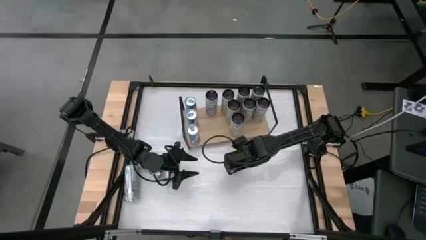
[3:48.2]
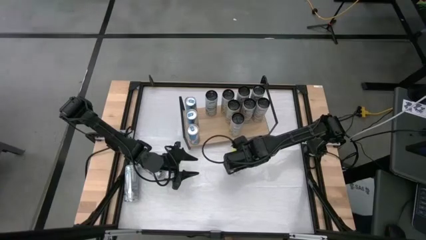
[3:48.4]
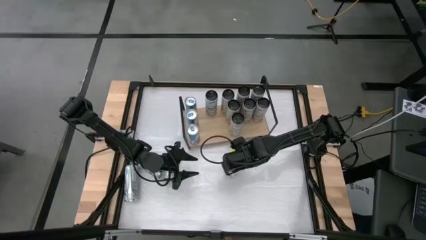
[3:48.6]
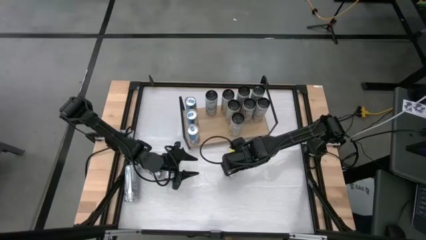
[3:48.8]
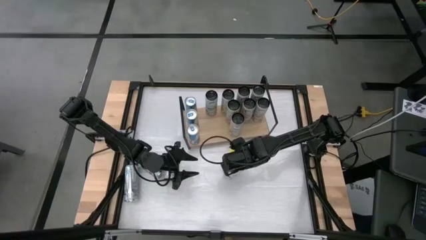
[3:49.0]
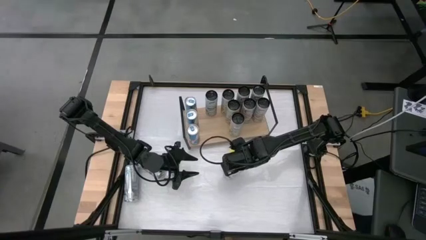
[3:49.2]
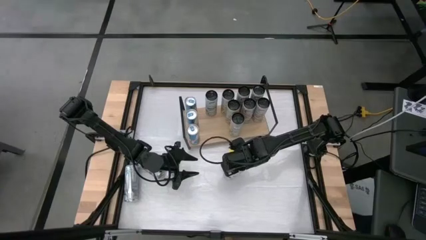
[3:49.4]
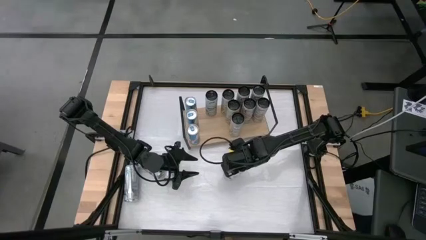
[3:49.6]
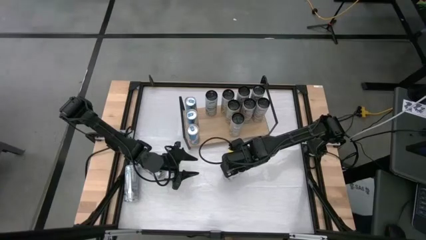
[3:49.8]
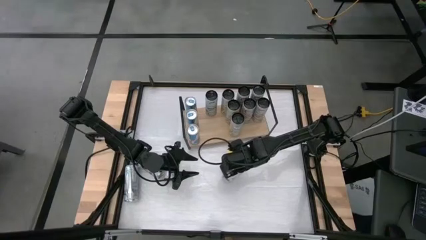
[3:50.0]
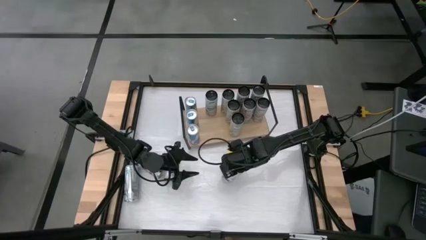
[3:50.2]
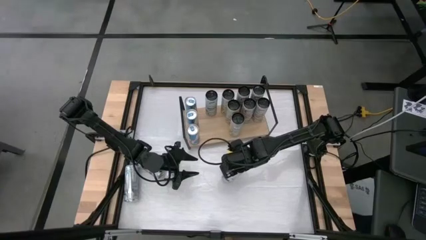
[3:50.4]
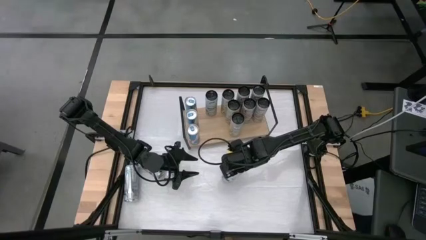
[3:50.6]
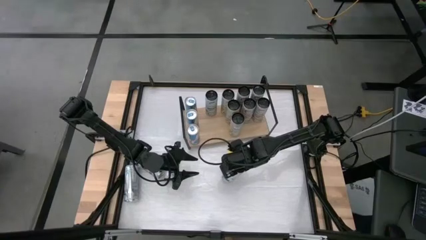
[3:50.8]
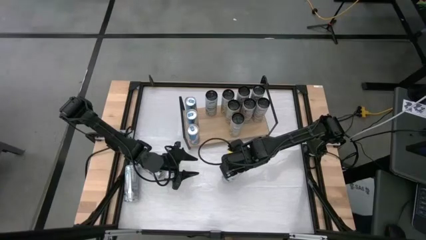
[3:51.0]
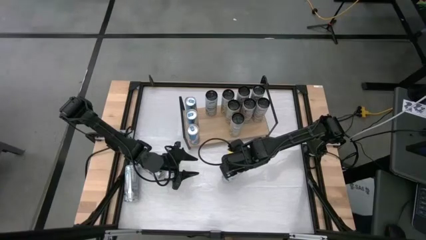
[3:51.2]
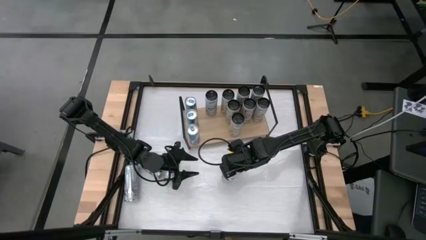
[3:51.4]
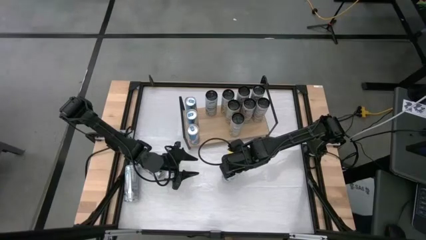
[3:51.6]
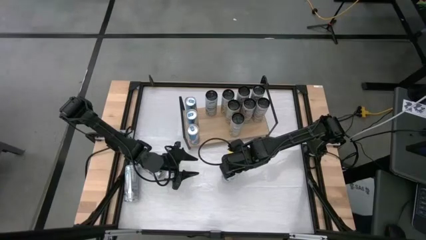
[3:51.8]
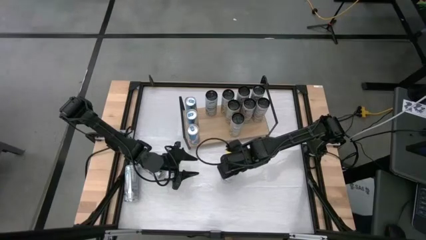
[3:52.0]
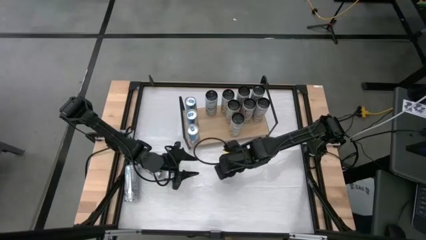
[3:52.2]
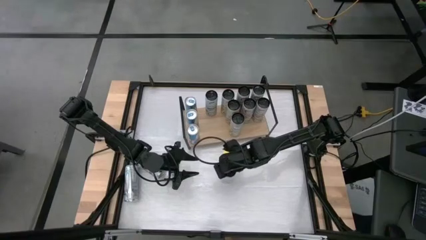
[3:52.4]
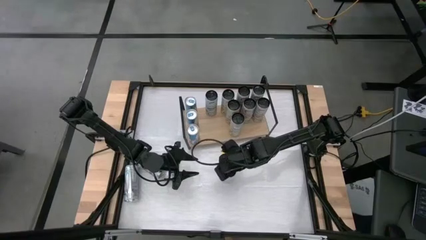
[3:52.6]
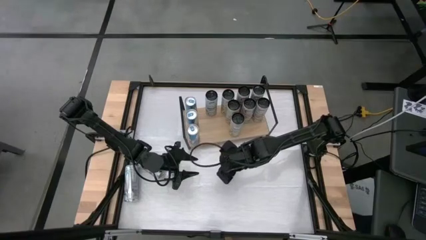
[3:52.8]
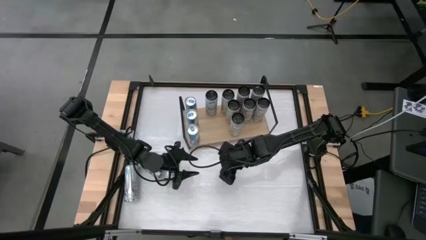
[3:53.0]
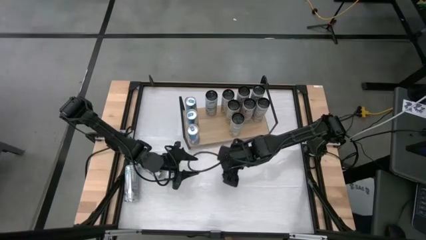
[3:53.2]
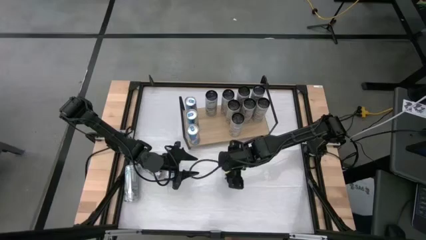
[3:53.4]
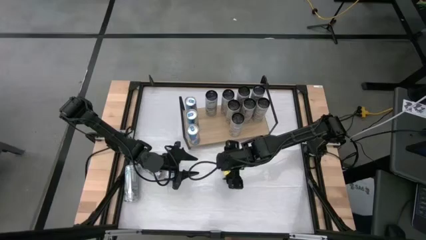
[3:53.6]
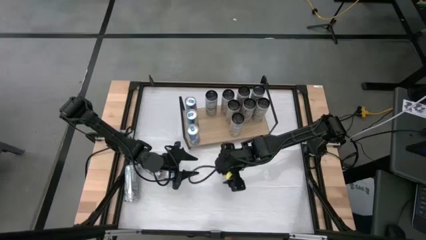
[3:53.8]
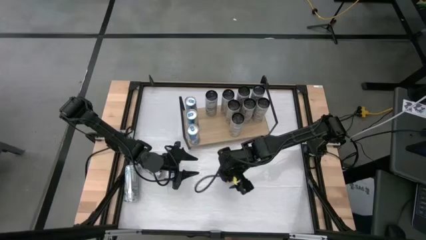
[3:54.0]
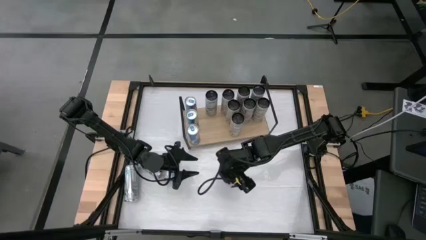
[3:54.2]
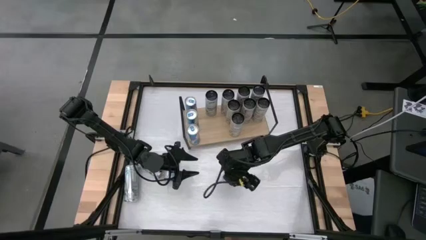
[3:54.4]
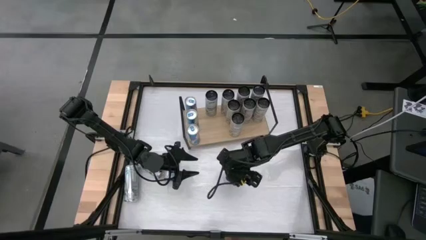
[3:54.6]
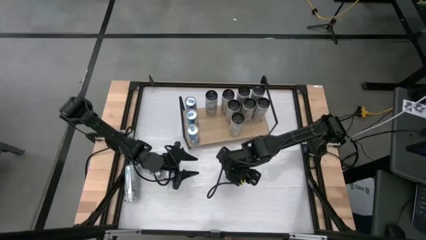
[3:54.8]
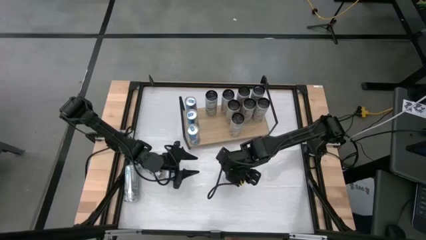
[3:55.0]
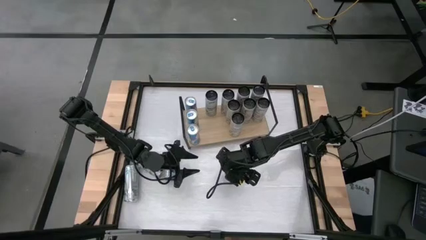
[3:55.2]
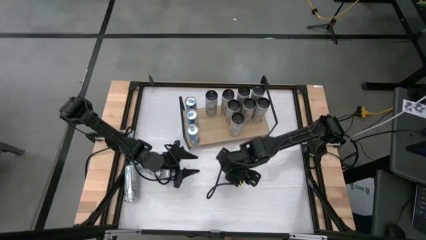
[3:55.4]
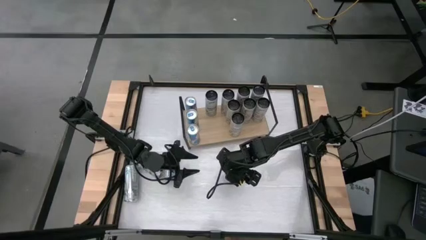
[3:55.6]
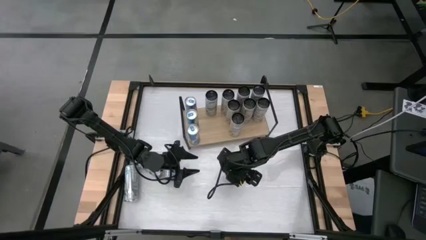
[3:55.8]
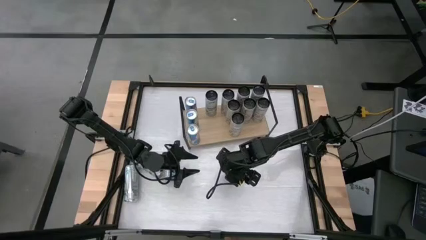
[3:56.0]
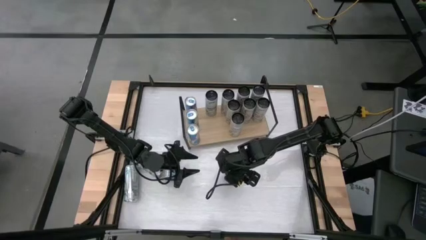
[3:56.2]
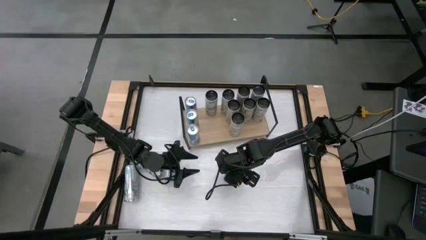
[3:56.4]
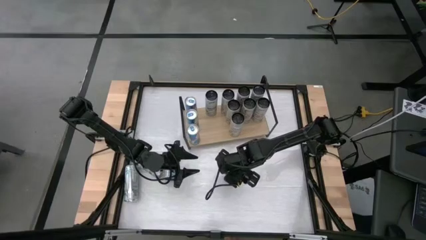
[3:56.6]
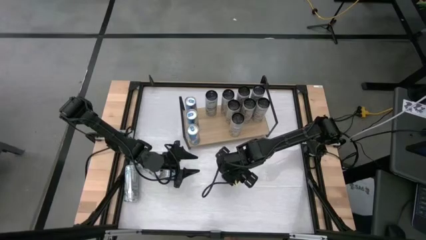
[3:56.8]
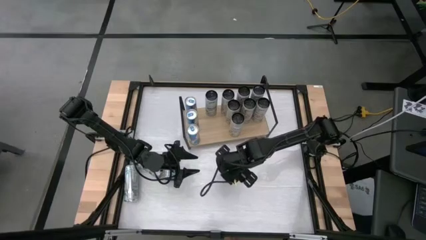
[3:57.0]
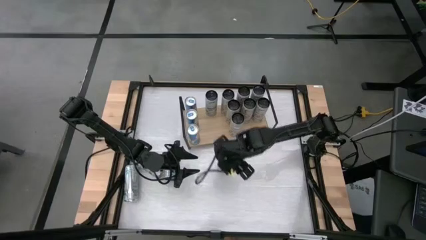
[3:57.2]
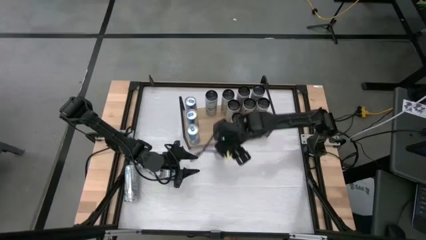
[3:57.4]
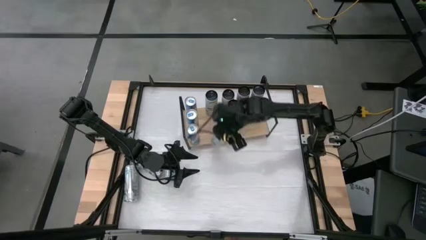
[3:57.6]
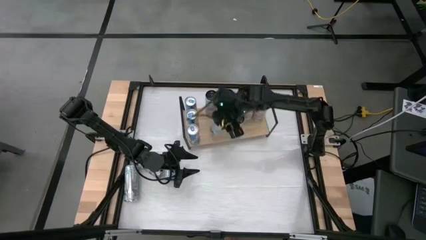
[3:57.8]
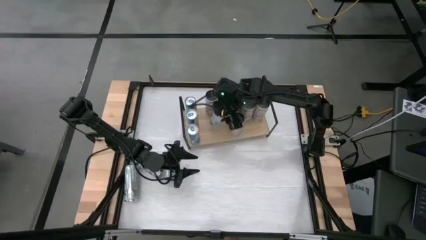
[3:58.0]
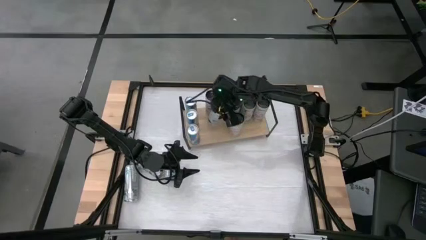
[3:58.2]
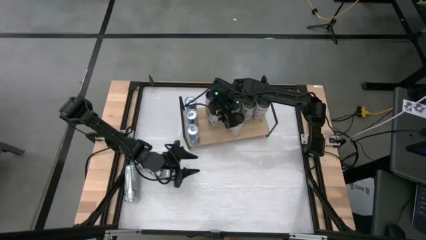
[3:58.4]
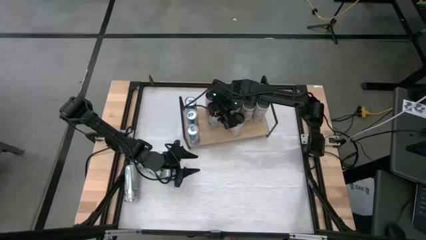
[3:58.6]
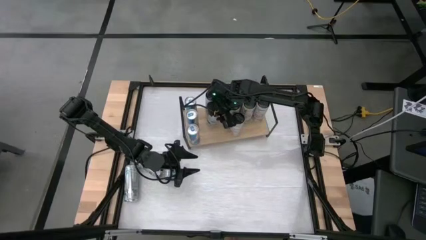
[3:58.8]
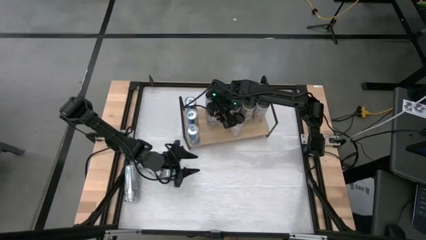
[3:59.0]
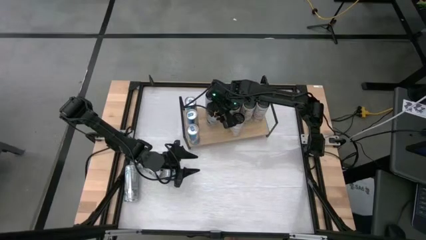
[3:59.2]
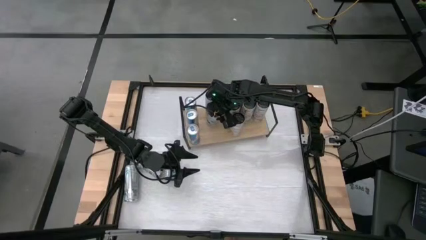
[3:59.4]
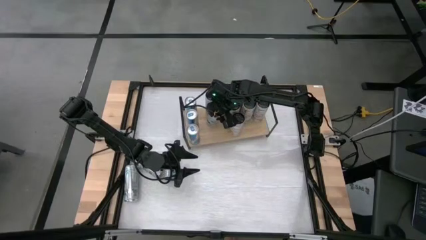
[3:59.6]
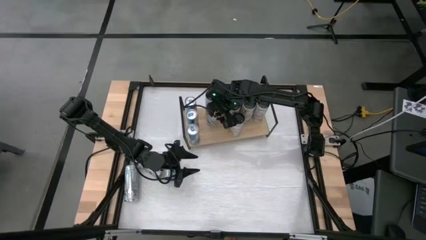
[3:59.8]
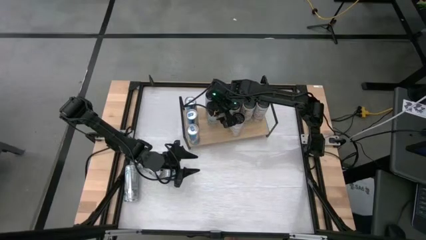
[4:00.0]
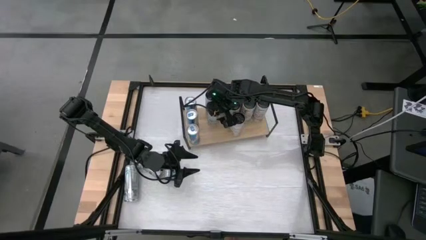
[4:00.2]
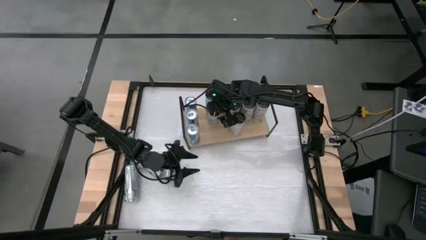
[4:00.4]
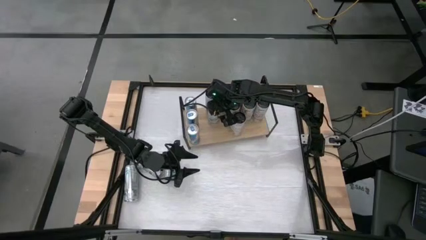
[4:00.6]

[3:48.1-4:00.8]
Task: Place canned beverage on shelf
Put the white-blue soda can on the shelf aligned with the other white-blue soda can

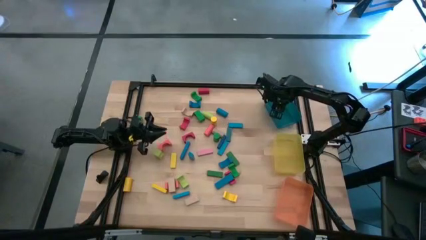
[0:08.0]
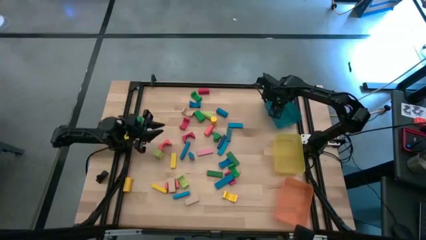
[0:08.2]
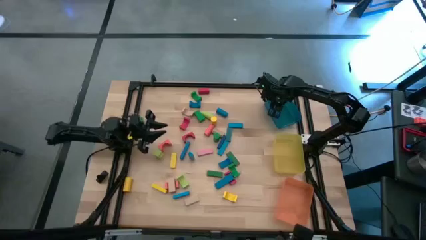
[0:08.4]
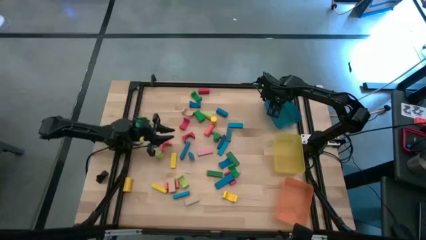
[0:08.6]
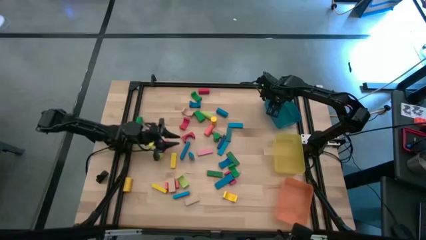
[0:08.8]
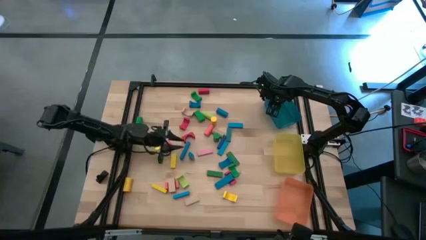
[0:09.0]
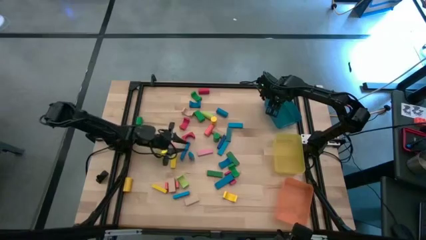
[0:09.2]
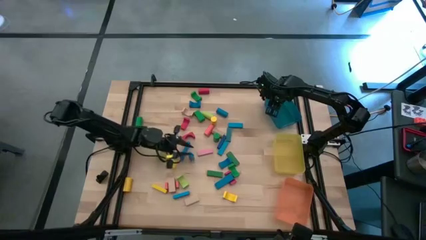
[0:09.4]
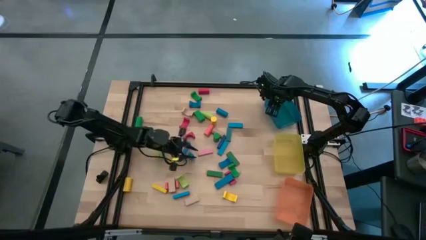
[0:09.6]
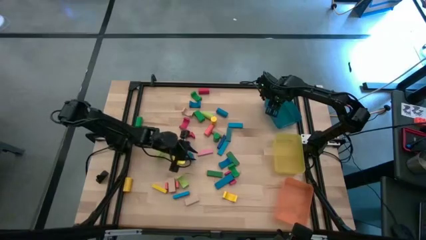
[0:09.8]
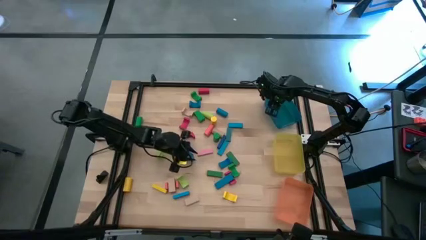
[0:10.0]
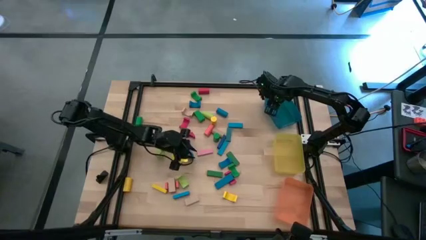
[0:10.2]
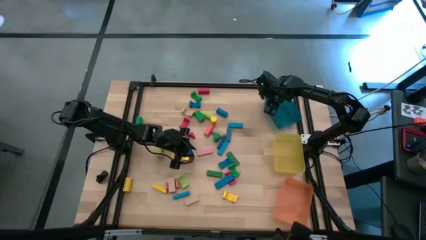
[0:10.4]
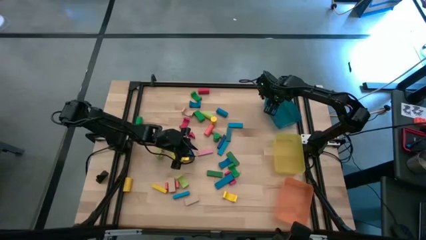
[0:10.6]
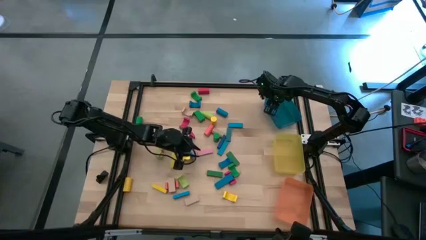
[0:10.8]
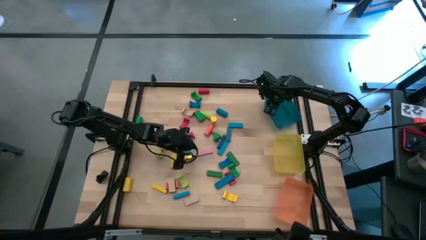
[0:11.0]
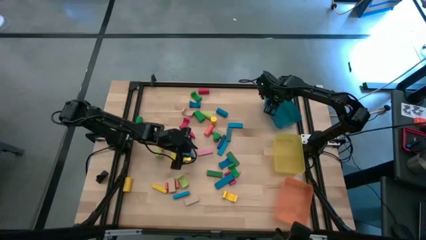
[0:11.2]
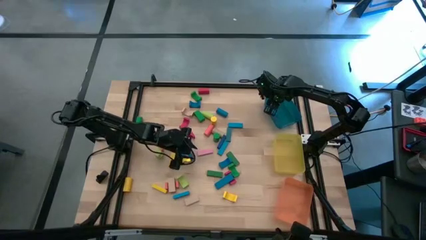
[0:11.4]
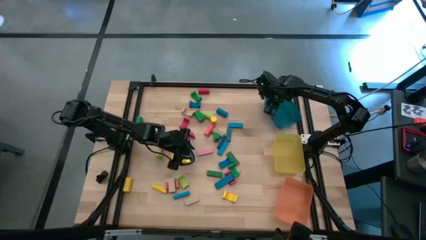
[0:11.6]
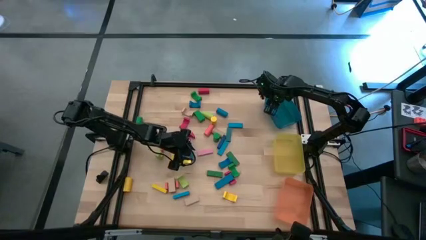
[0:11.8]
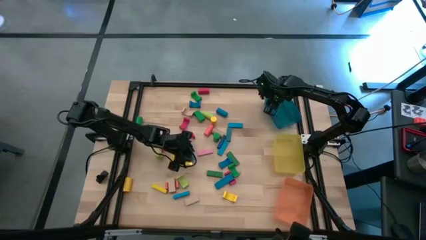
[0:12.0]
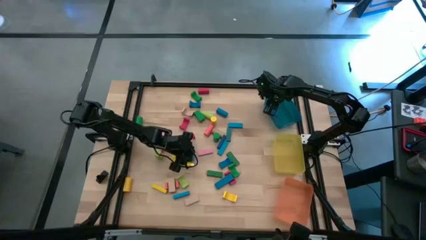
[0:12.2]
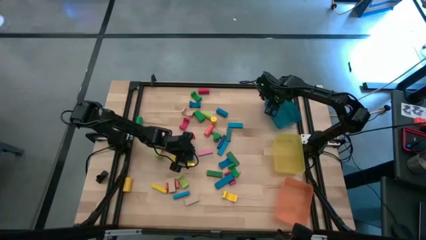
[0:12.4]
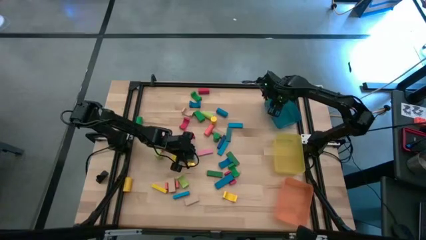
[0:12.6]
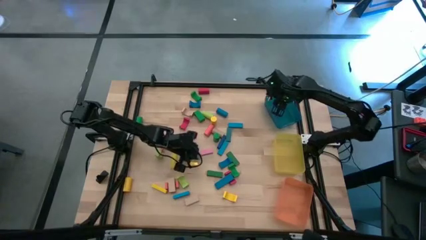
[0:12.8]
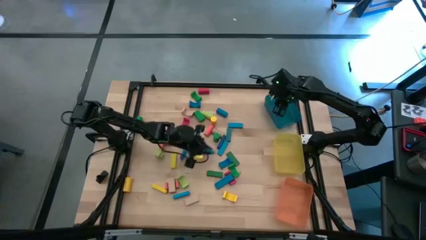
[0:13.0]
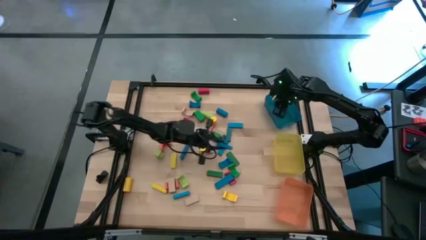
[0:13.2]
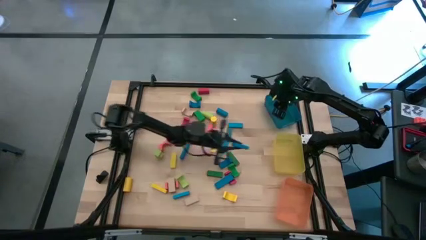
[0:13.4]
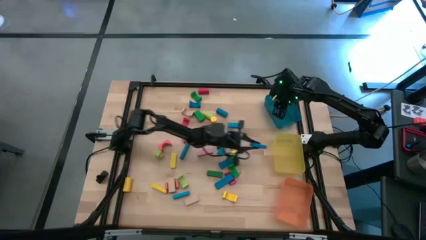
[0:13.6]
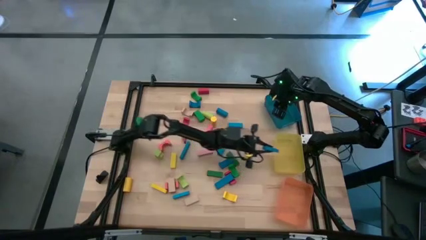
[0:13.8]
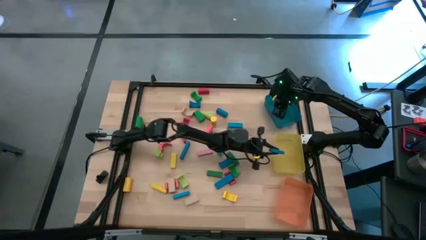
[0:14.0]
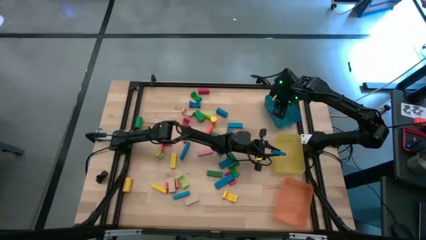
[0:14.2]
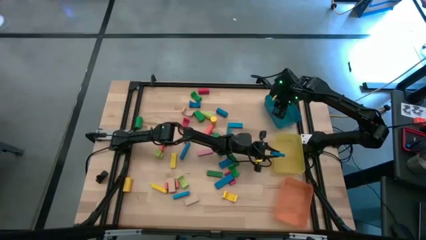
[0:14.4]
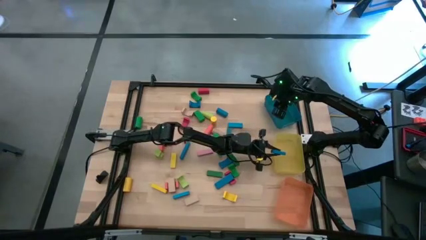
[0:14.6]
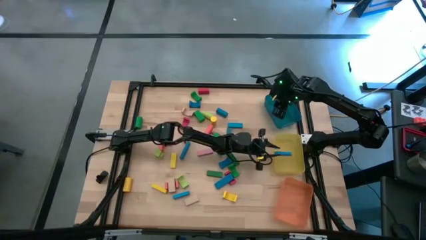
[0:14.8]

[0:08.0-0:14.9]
Task: Sort blocks by size
Put the blue rectangular block into the yellow bin
